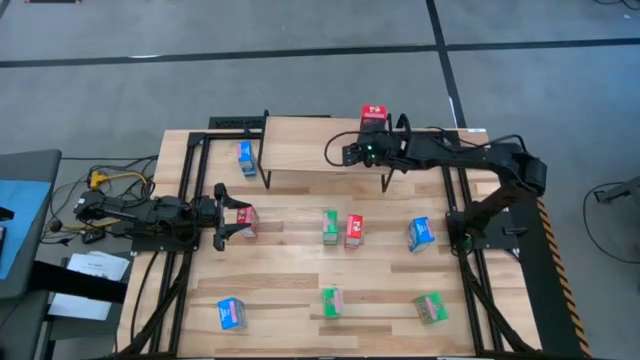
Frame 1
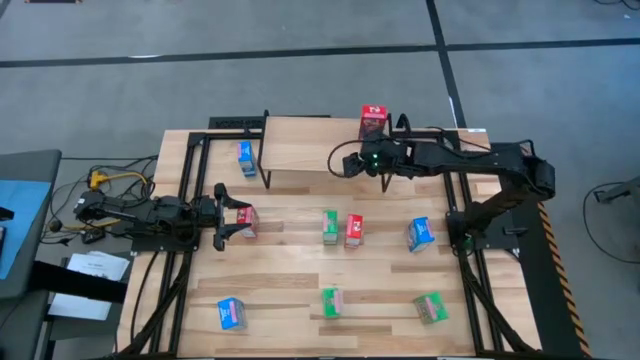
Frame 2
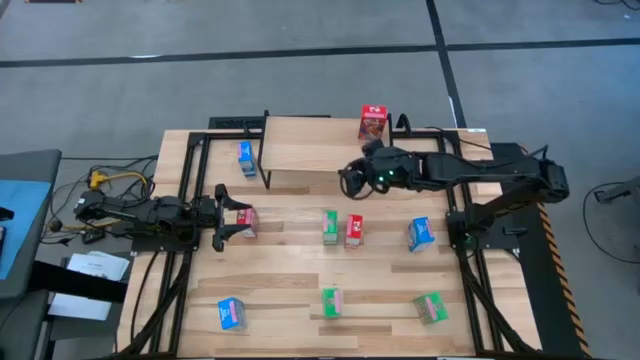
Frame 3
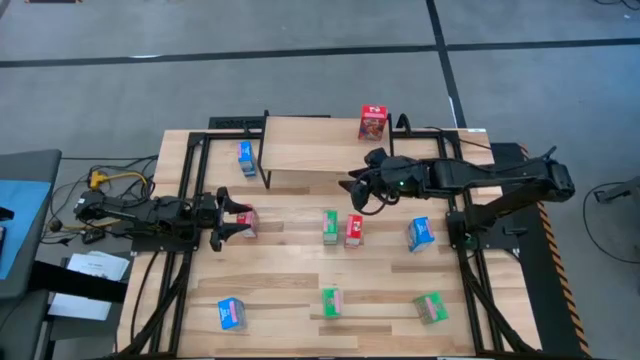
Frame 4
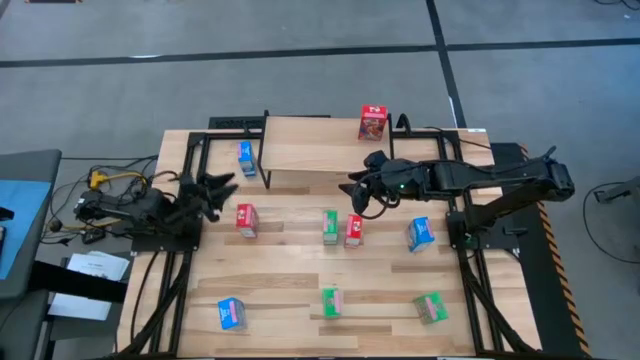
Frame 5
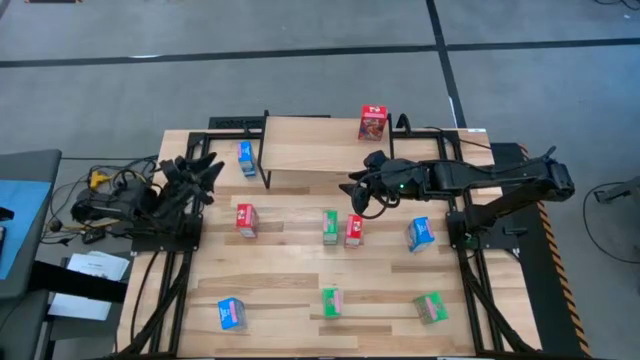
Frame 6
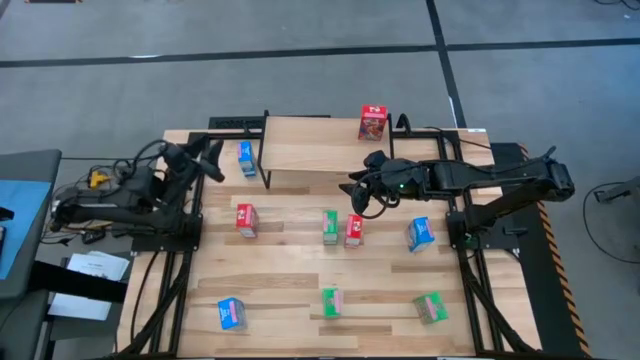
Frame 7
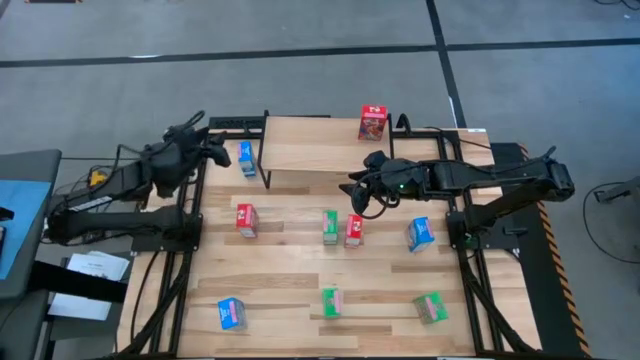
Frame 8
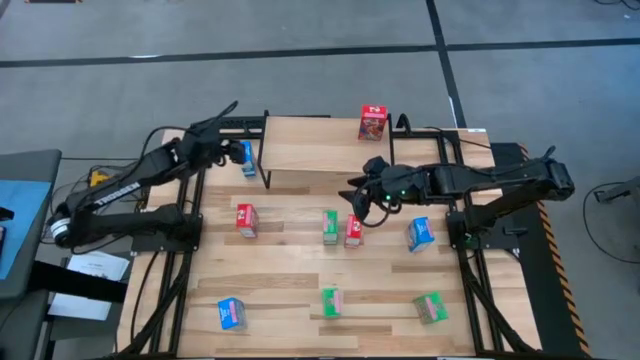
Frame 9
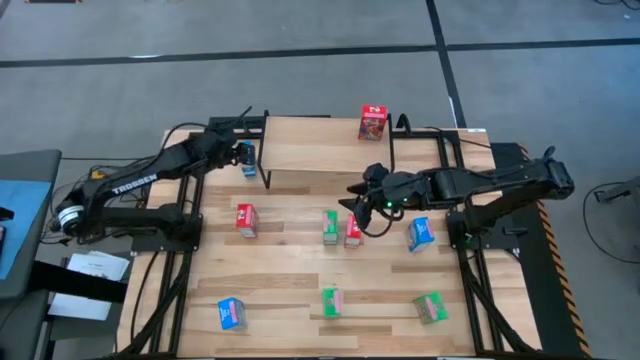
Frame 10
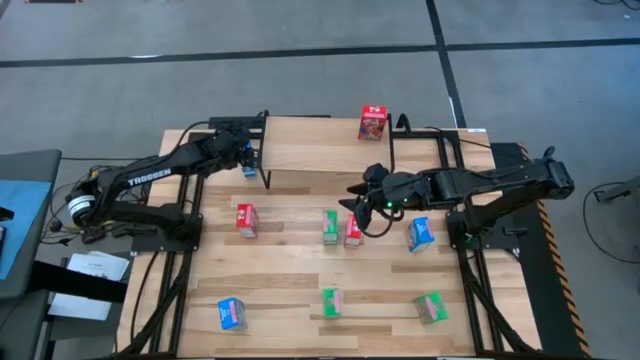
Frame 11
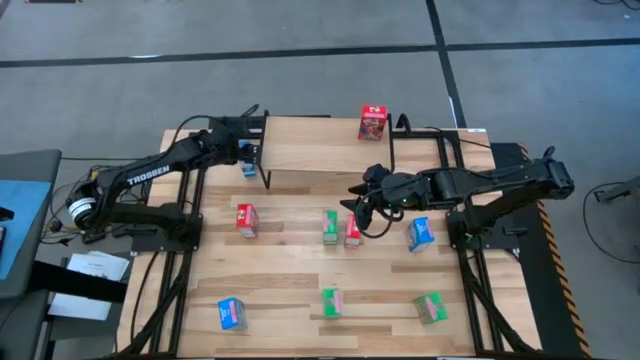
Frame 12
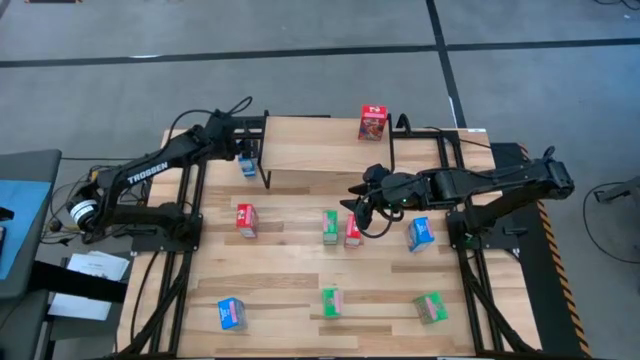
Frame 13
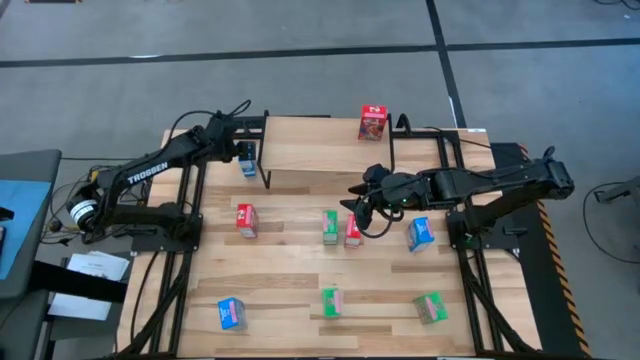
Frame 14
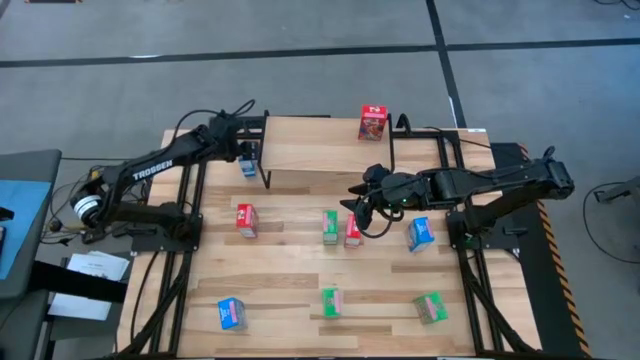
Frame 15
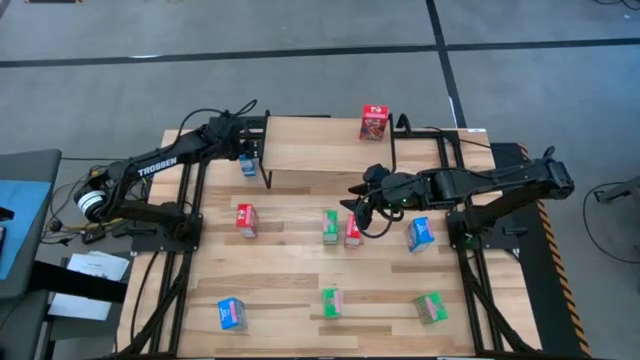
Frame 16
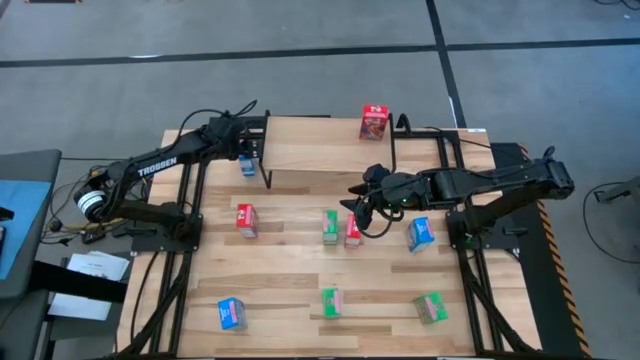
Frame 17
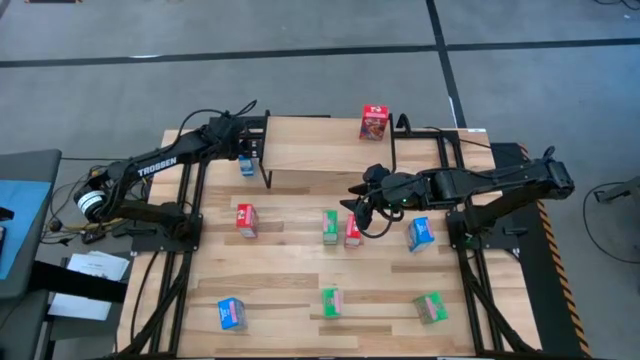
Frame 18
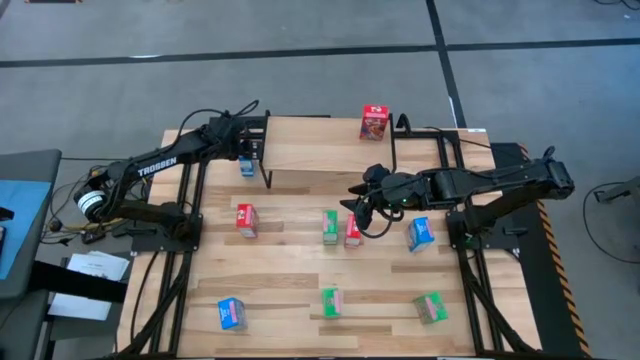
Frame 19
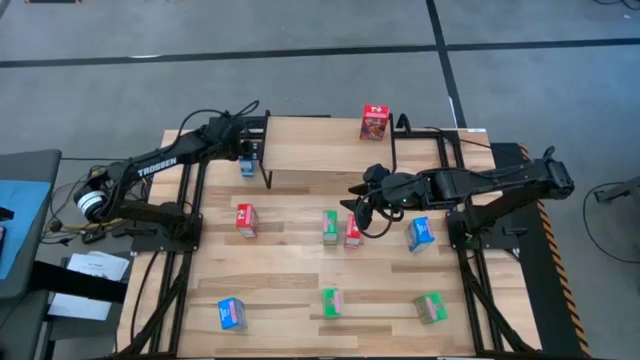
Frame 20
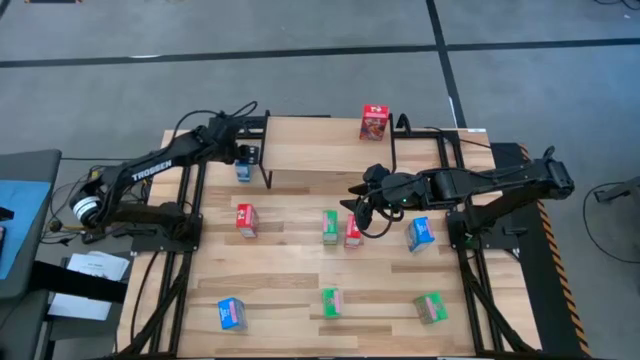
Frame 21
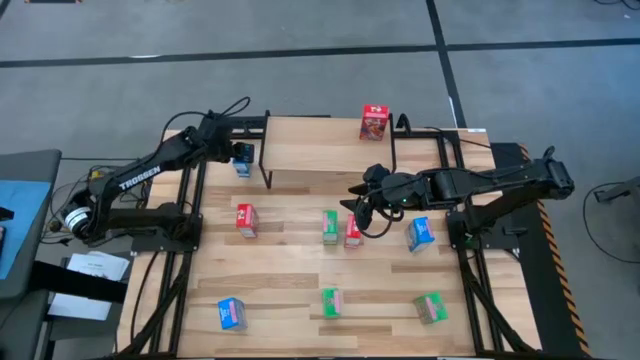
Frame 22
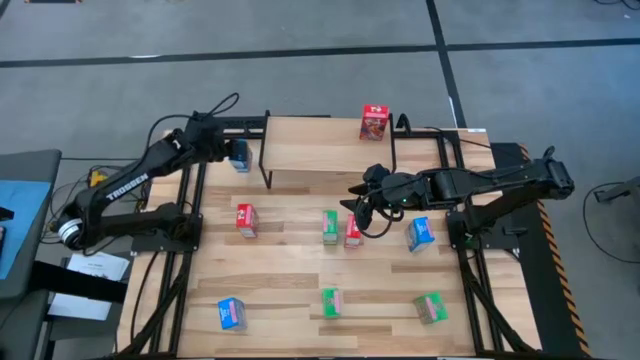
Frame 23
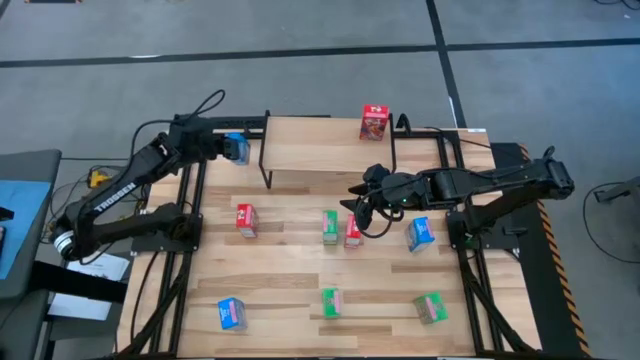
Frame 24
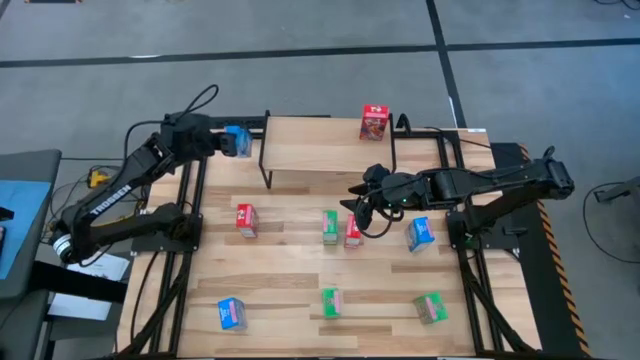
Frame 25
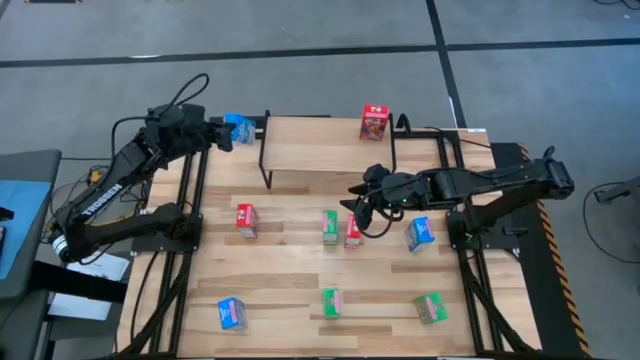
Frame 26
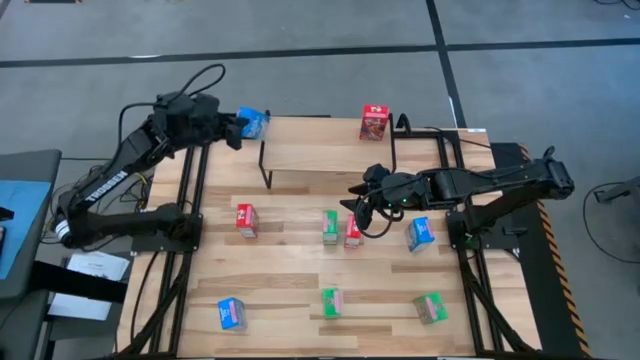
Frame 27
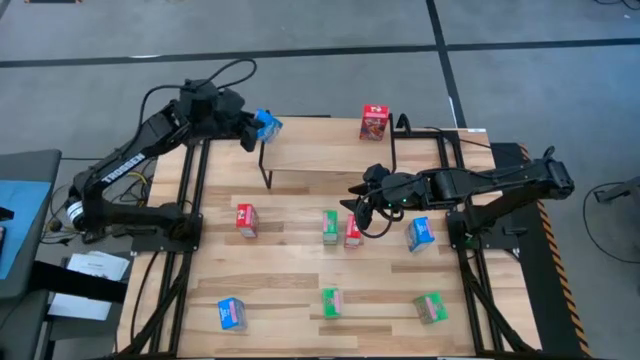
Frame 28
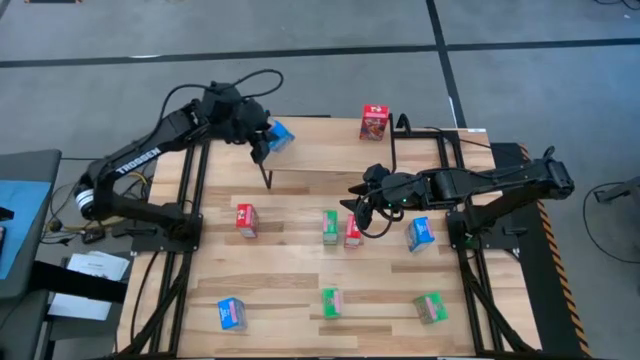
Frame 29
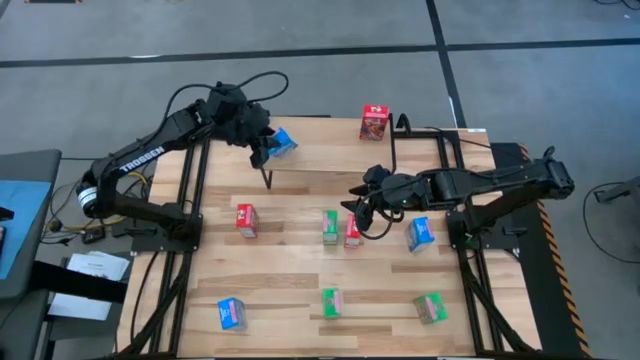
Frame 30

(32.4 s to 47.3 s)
Task: Stack cereal on shelf
Put the top blue cereal box on the shelf

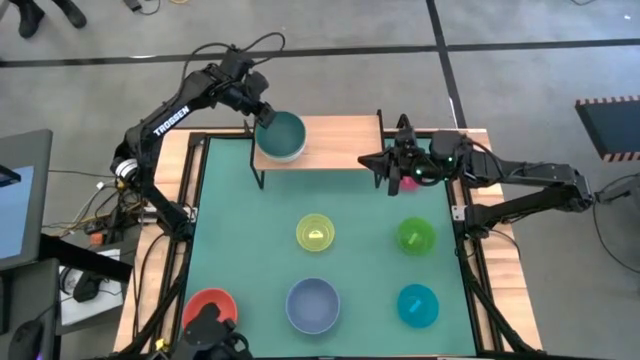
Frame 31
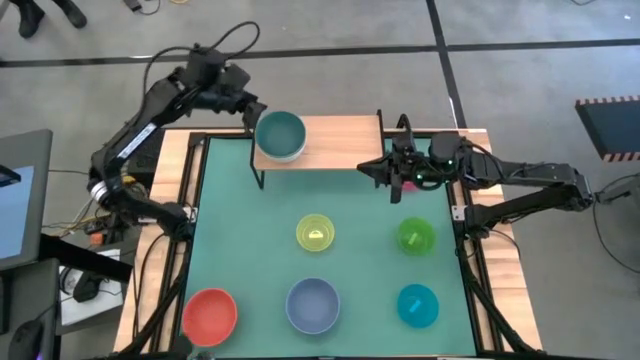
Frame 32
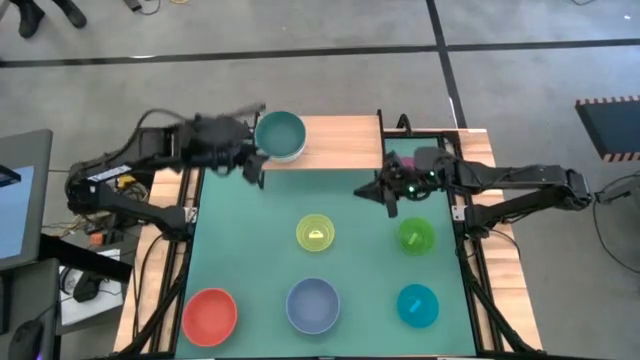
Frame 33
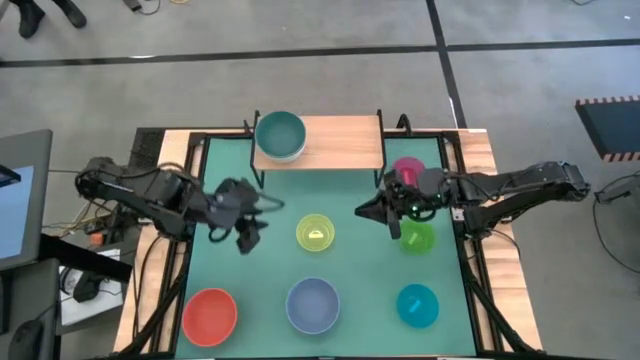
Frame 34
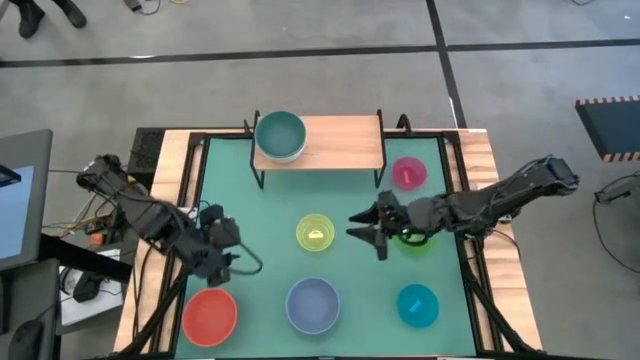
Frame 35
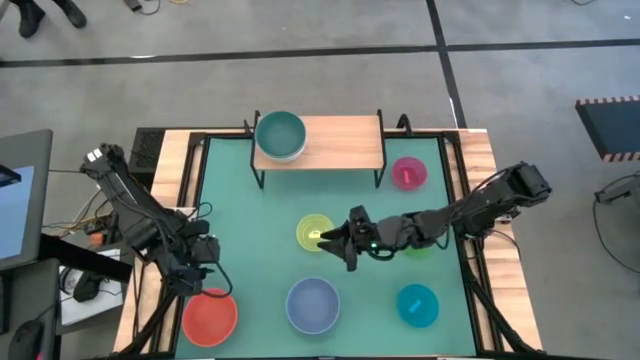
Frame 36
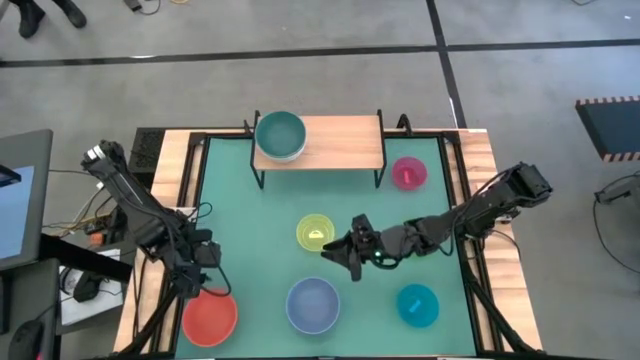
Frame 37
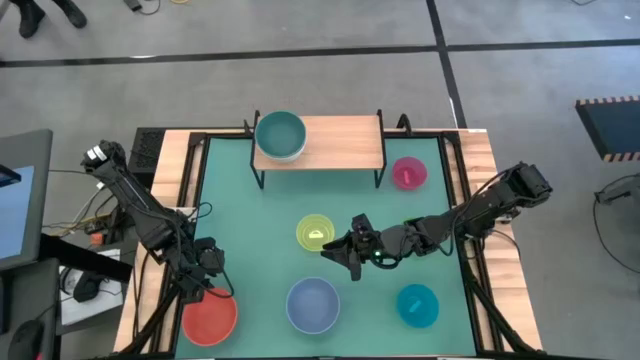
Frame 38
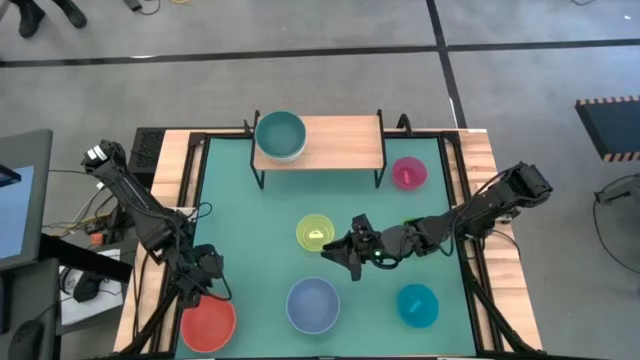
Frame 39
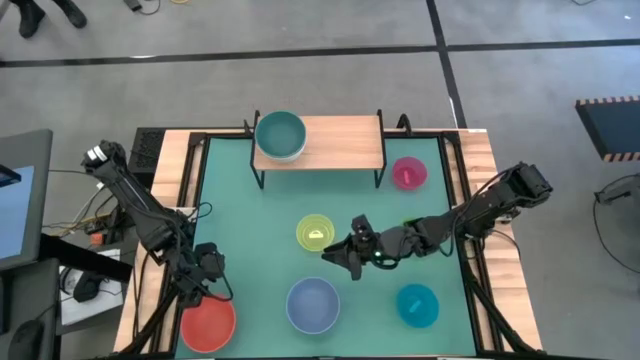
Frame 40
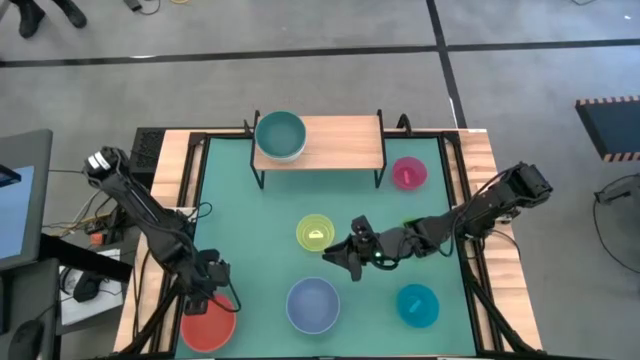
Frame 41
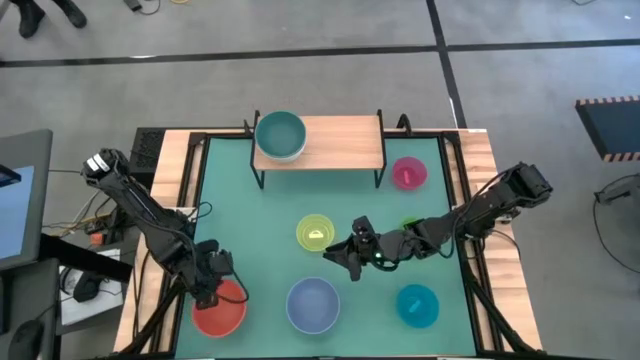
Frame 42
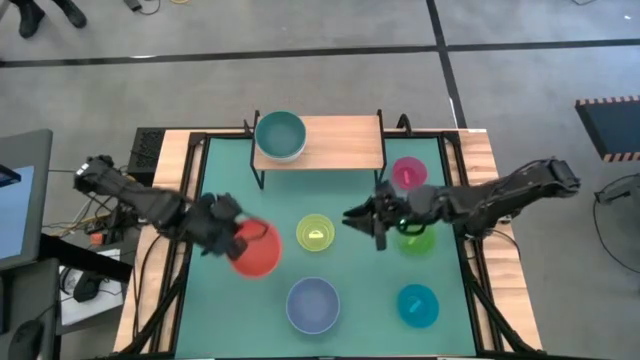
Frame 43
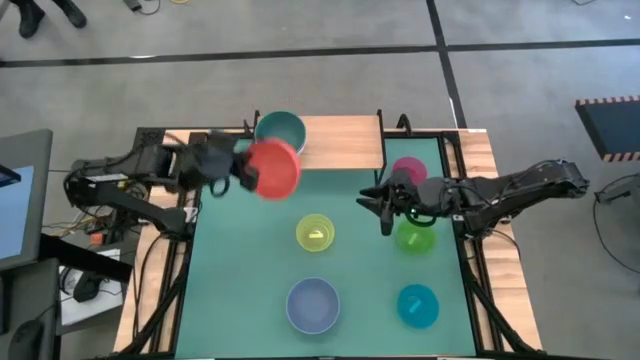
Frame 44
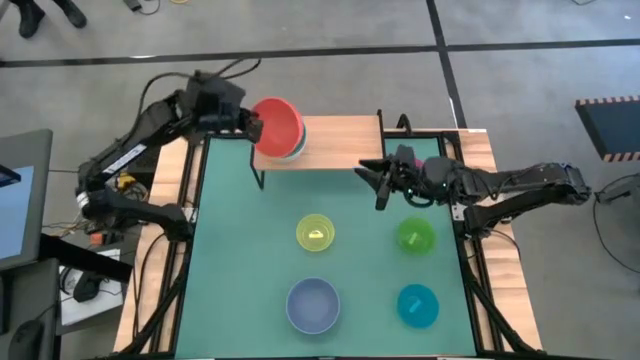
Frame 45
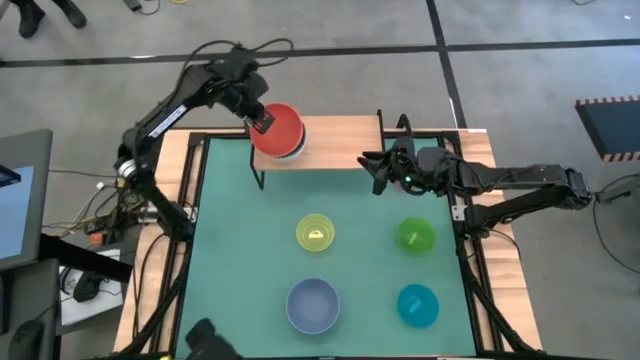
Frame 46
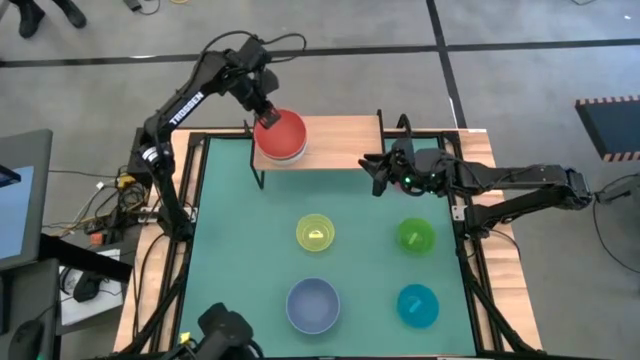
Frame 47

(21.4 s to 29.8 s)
Task: Place and stack bowls onto a shelf
Stack the large orange bowl on the large white bowl on the shelf
